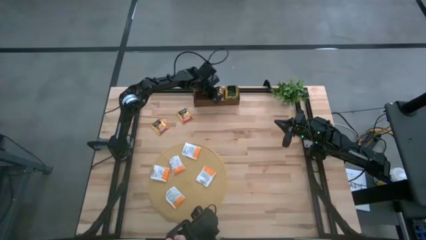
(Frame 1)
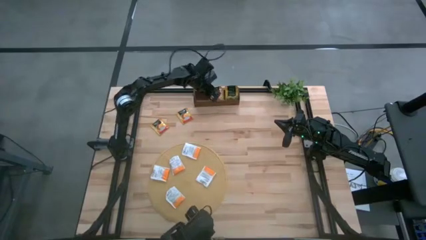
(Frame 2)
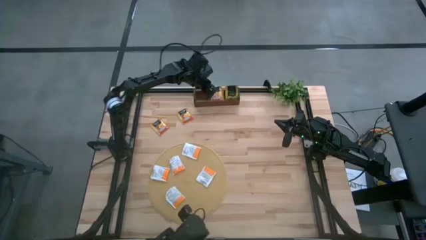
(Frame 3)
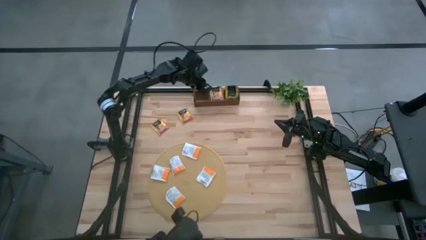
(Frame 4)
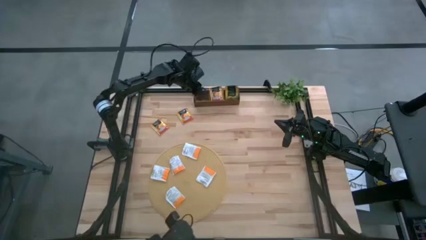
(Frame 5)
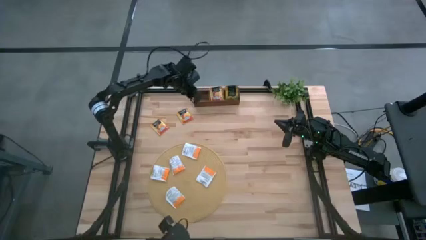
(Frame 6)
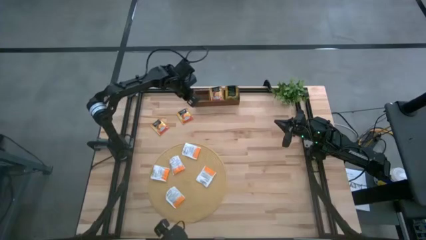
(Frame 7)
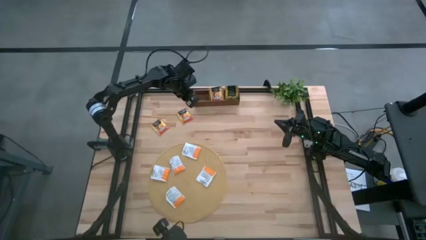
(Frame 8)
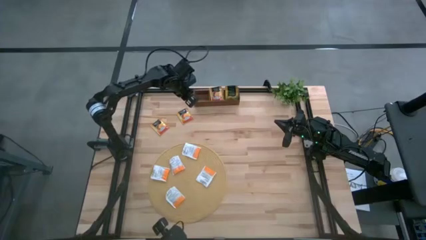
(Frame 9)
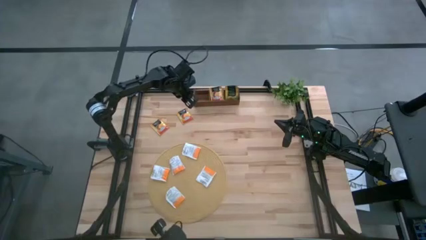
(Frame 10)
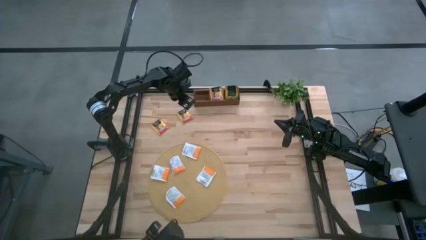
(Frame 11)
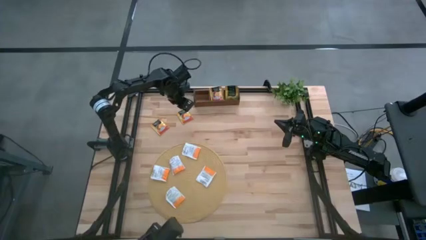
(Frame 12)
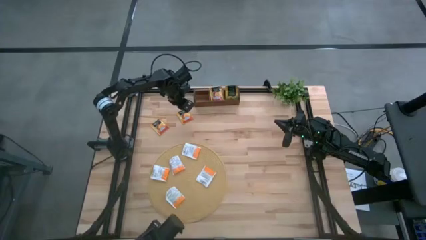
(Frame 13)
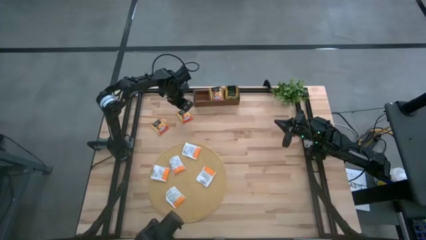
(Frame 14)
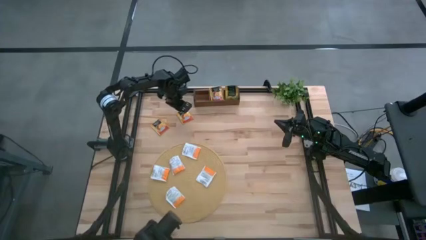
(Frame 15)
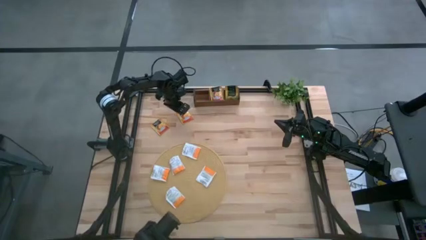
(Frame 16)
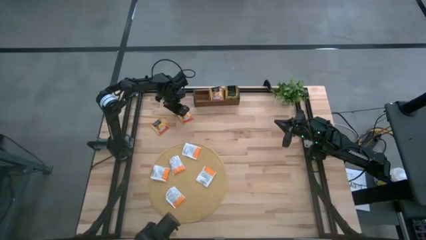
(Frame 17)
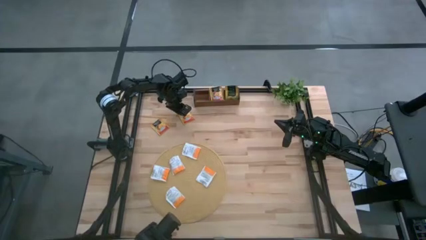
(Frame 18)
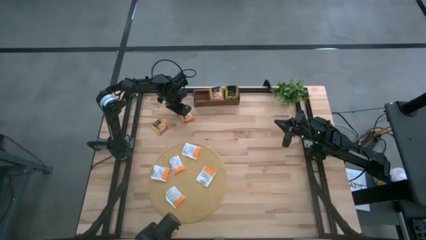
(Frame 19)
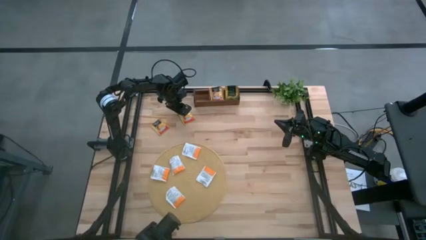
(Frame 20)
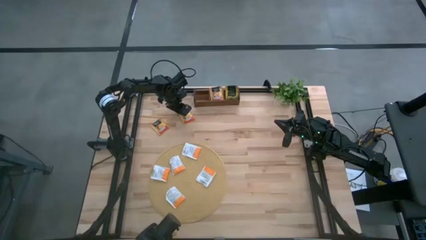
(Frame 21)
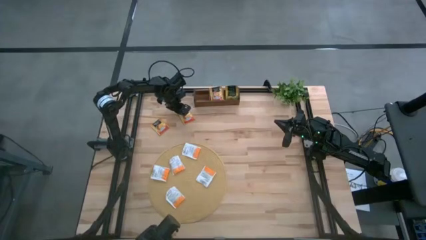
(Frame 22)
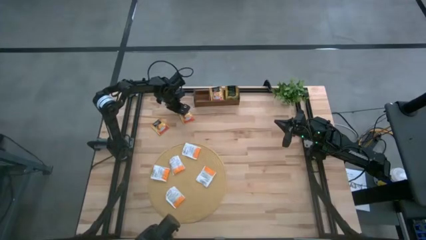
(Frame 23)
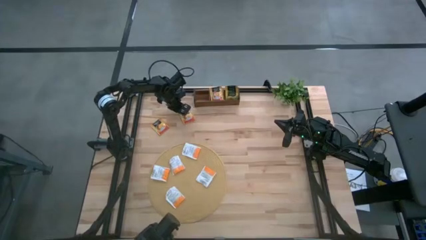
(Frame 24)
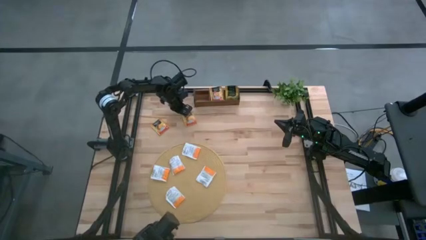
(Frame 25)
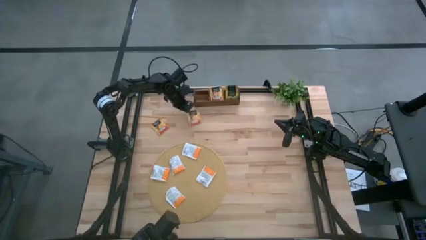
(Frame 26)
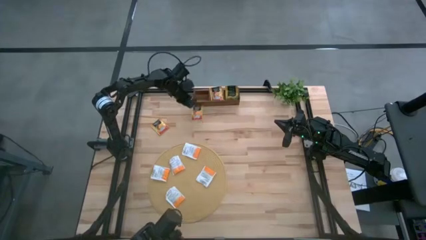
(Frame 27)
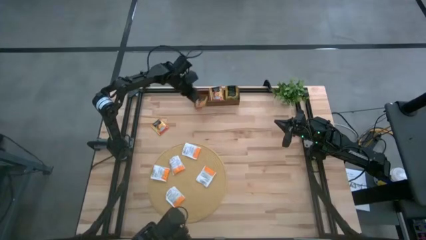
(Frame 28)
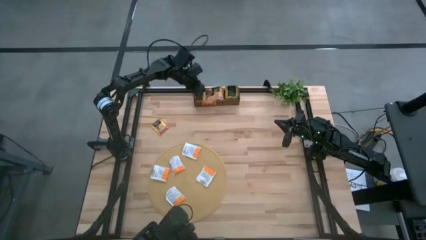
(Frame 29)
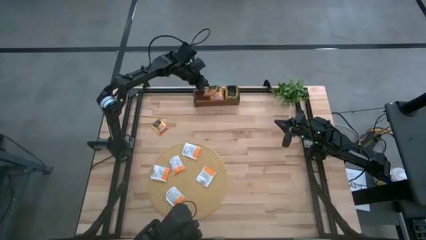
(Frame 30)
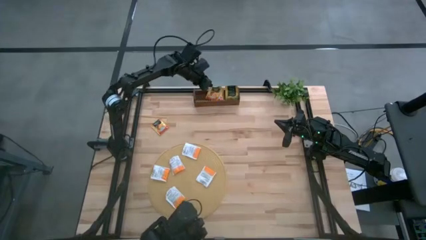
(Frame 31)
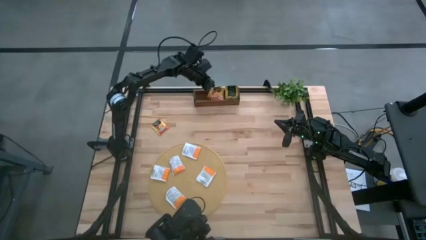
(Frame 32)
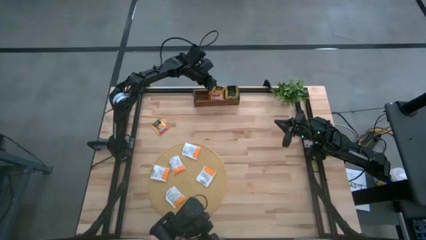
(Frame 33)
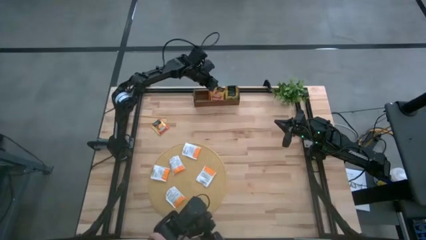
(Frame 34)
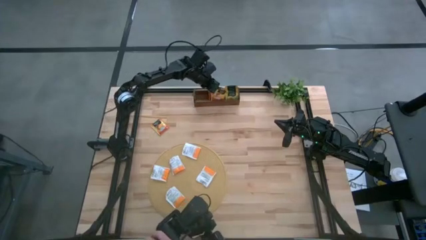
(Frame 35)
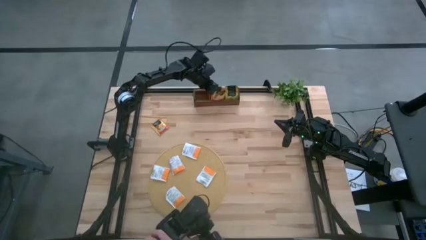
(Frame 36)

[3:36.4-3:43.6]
Task: Pick & Place Tea
Put the yellow tea bag into the middle slot of the wooden organizer

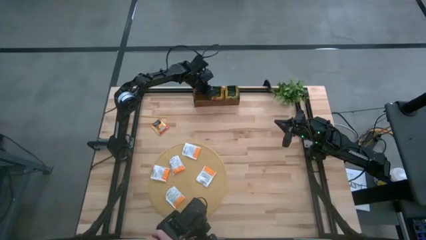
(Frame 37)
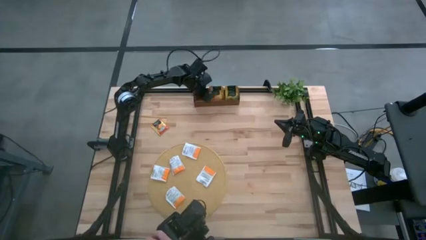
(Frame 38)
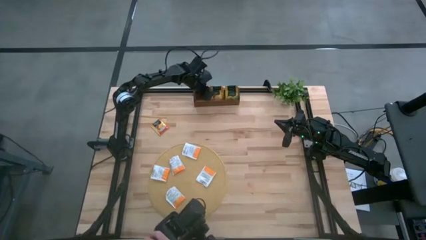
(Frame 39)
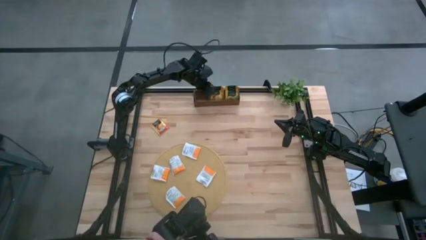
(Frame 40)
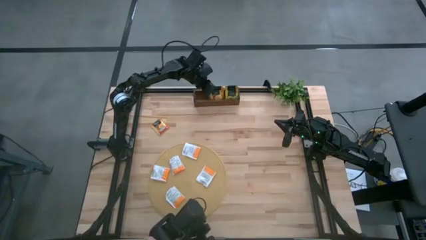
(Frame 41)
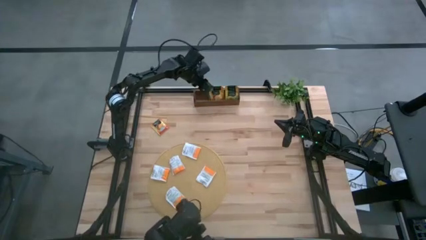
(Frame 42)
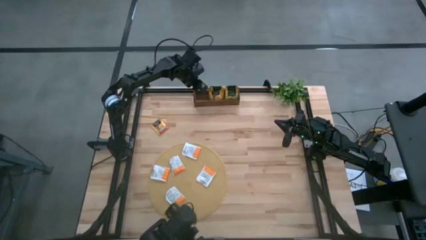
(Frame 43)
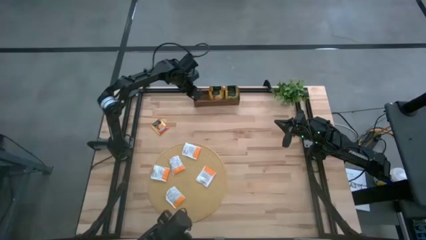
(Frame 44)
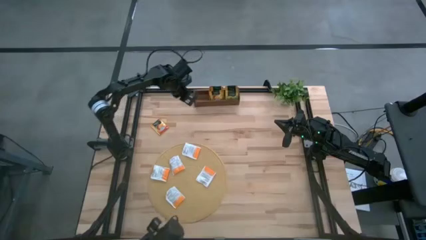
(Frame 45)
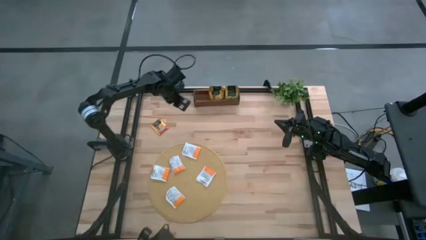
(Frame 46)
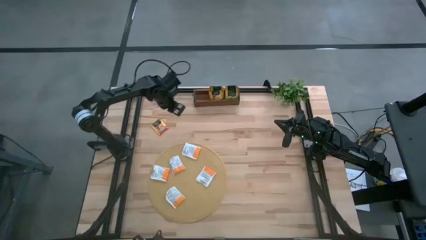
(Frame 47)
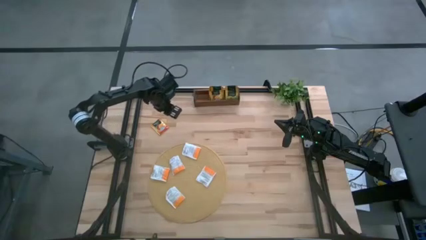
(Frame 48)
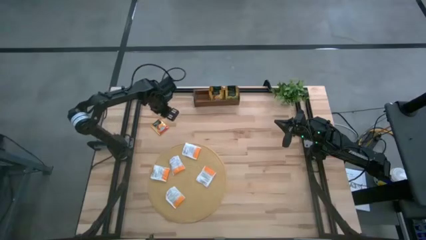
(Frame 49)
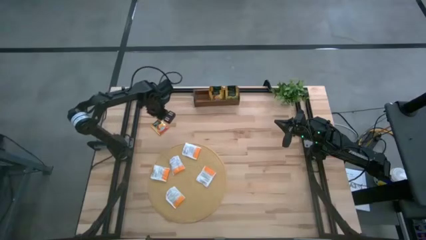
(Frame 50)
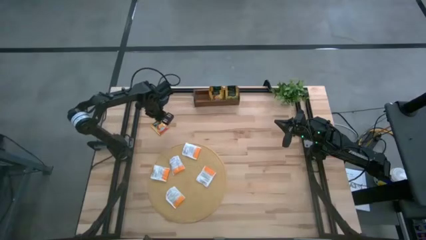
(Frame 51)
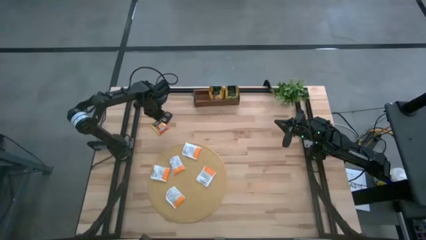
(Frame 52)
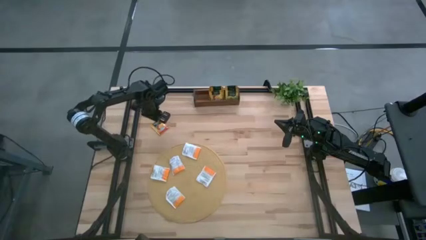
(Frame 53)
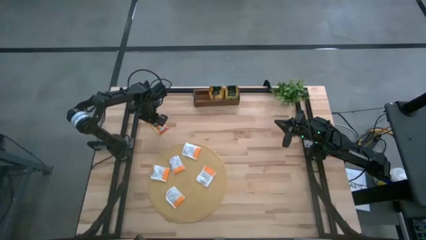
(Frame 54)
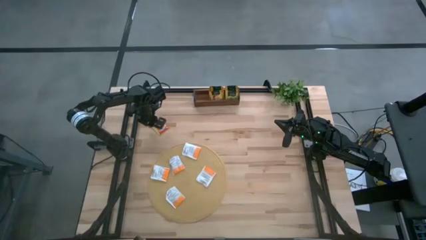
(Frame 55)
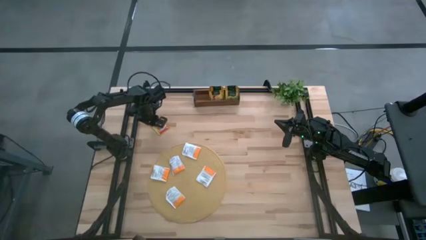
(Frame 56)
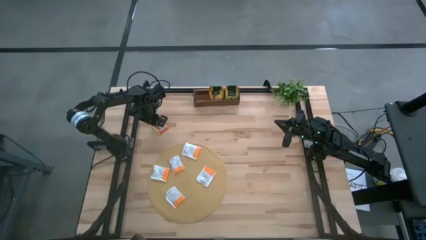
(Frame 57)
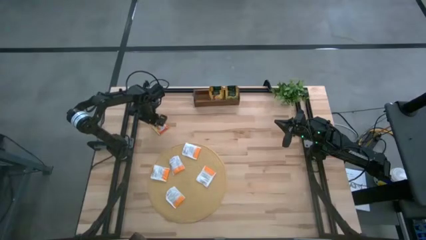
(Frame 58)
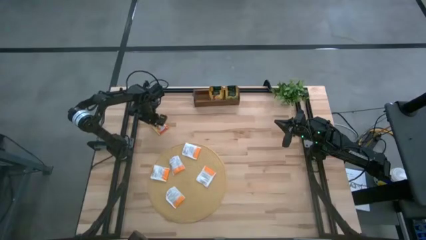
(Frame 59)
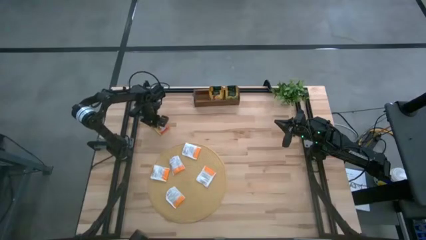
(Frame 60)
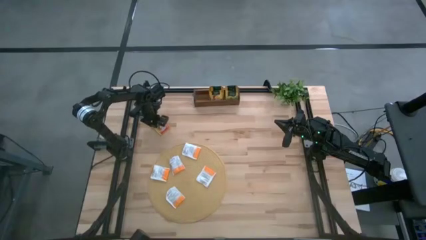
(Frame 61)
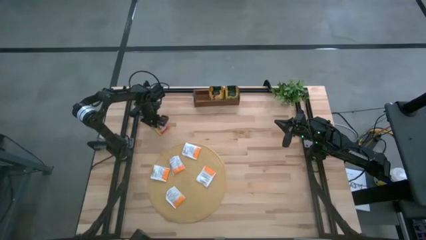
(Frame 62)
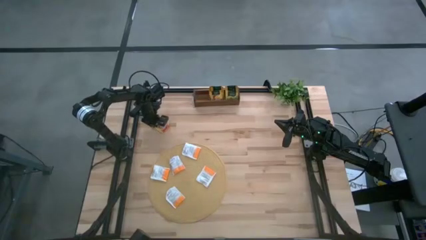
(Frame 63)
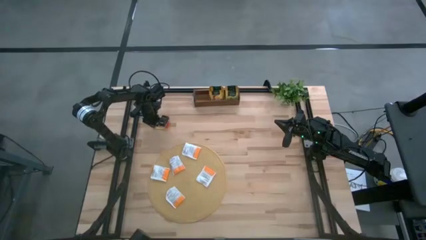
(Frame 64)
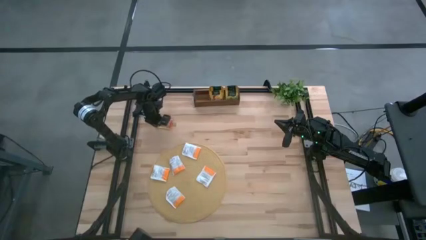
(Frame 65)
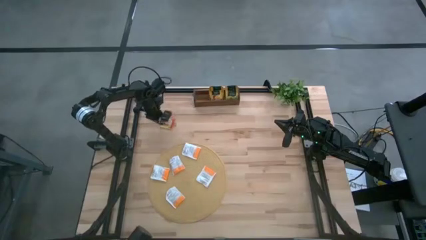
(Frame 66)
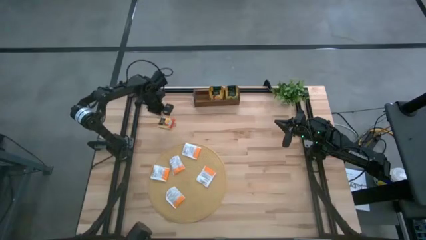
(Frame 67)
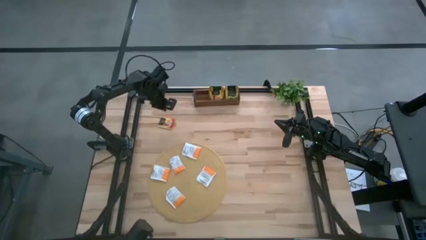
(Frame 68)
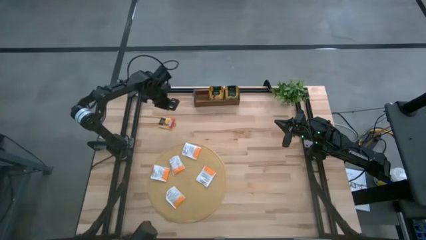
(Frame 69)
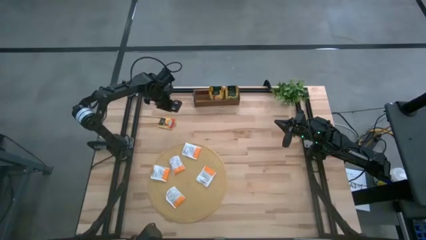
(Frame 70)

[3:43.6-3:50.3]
Put the yellow tea bag into the middle slot of the wooden organizer

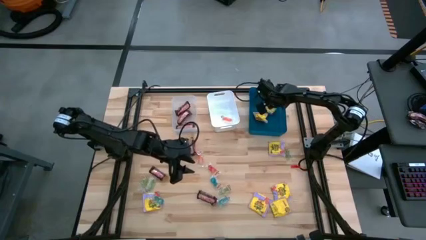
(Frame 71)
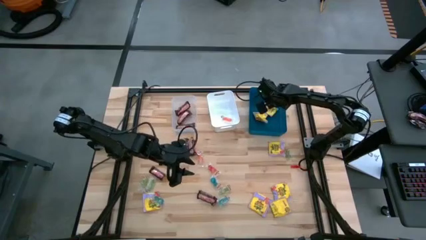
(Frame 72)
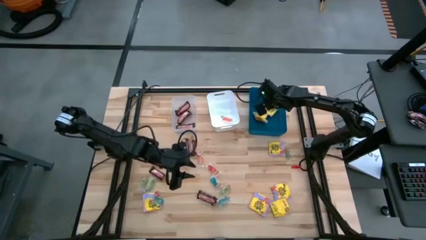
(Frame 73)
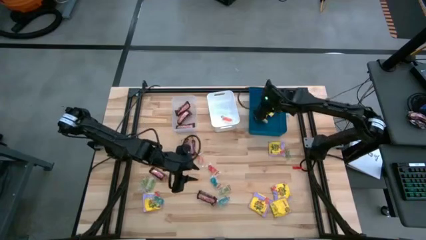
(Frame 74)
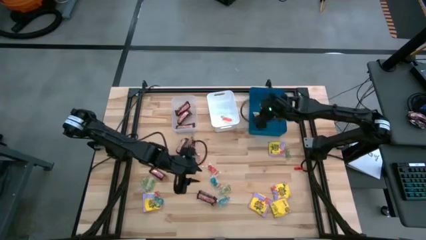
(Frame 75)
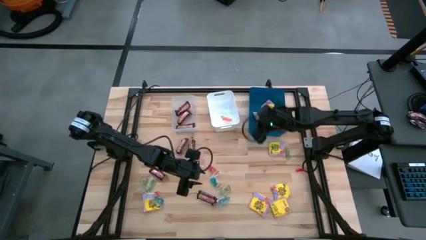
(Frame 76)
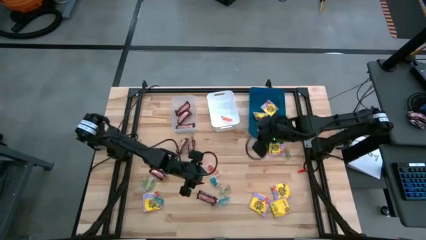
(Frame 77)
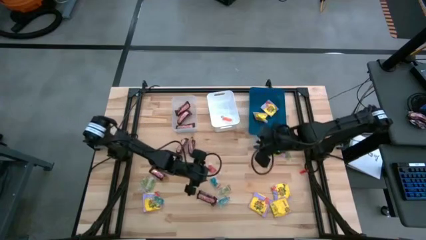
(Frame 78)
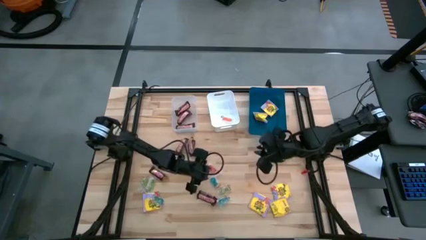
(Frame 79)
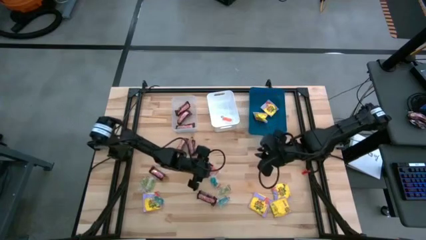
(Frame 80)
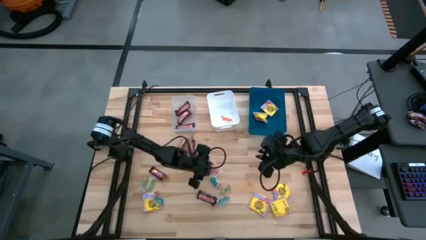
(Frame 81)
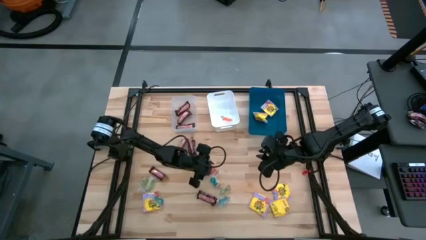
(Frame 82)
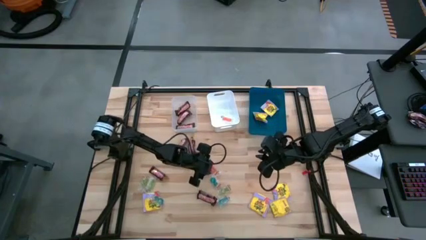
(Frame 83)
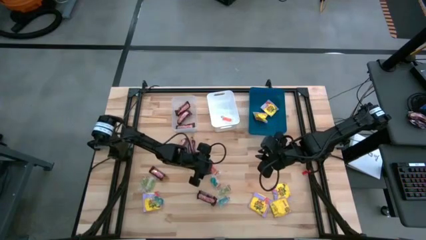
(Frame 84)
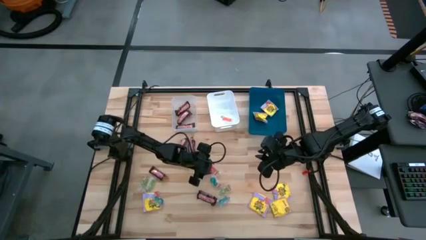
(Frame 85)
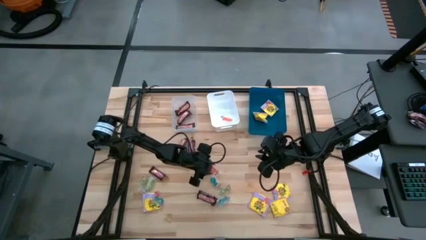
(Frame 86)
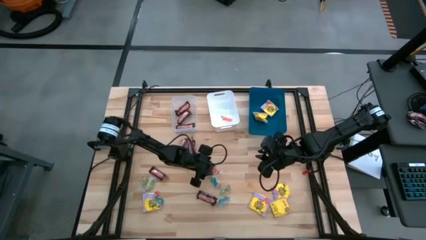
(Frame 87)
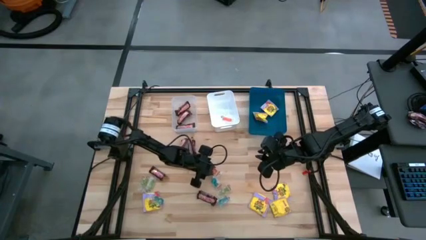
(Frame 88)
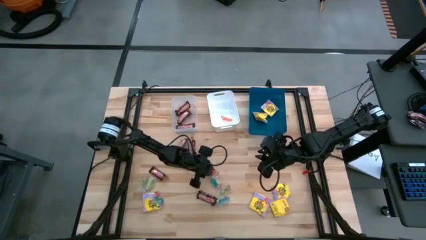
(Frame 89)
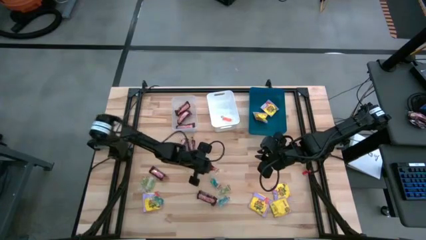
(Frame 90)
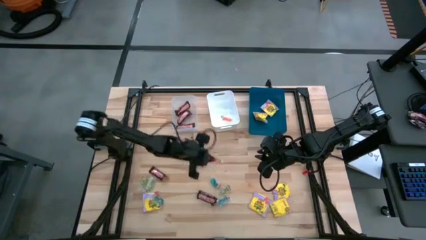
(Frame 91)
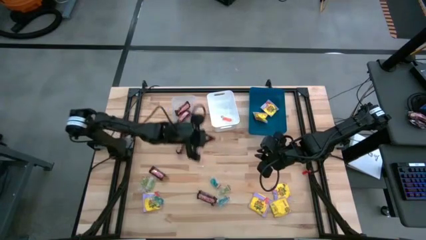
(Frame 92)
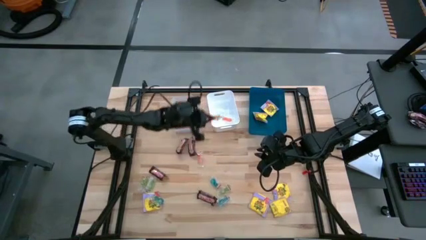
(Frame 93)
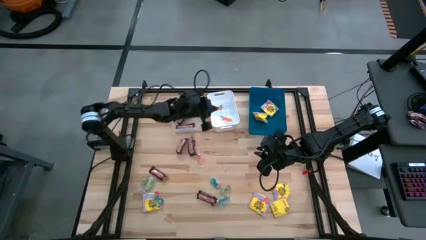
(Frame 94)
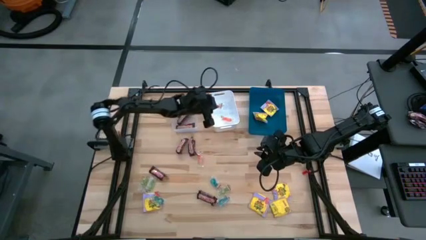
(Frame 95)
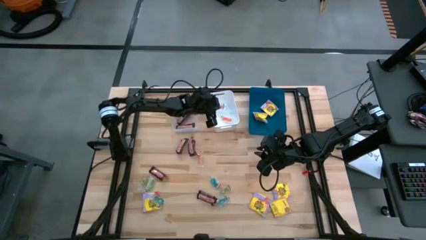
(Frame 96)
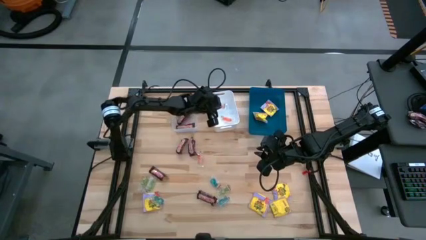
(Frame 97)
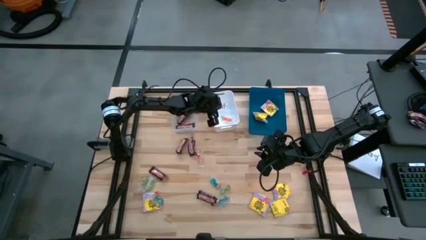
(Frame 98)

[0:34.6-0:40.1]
Task: Sort candy
Put the center orange jelly candy into the white bin
